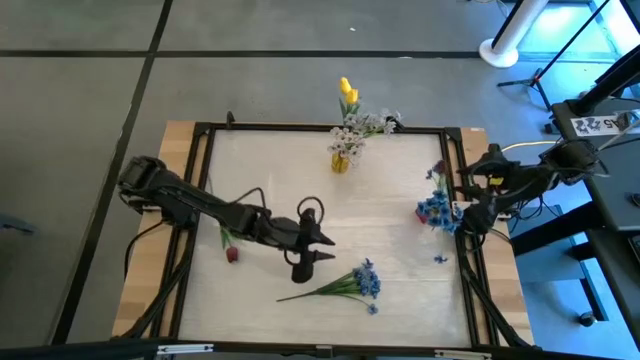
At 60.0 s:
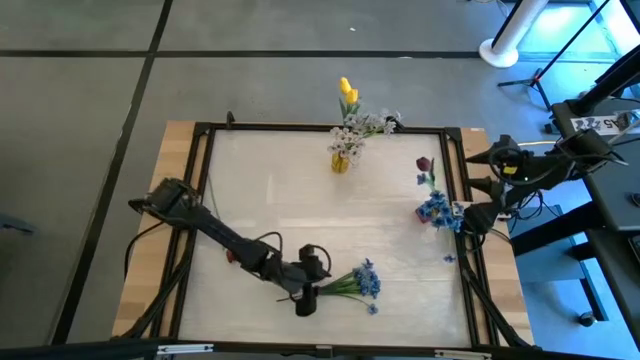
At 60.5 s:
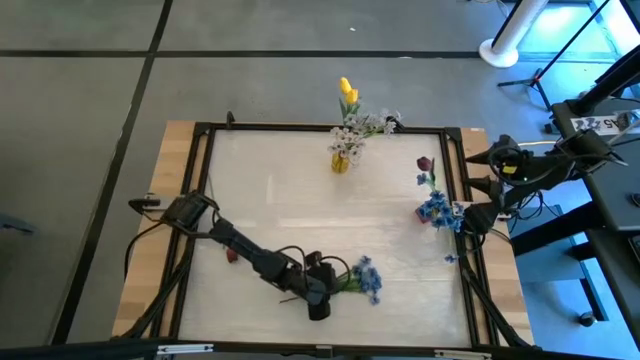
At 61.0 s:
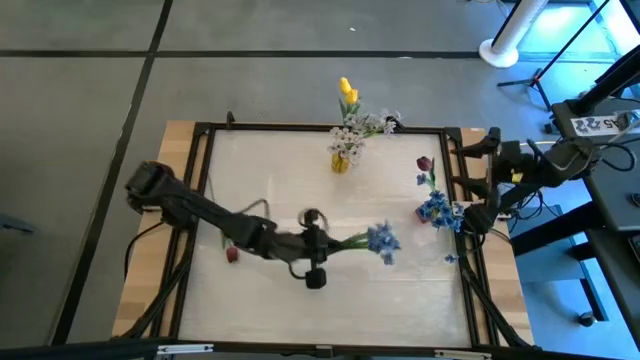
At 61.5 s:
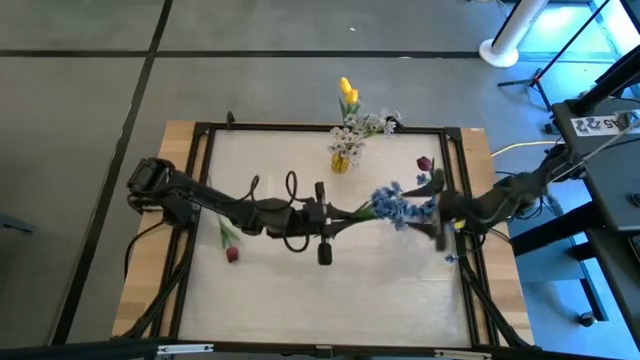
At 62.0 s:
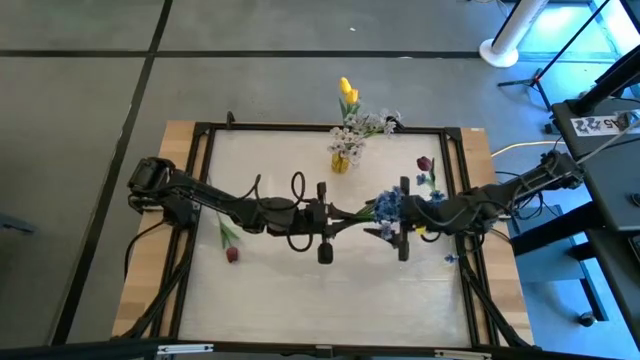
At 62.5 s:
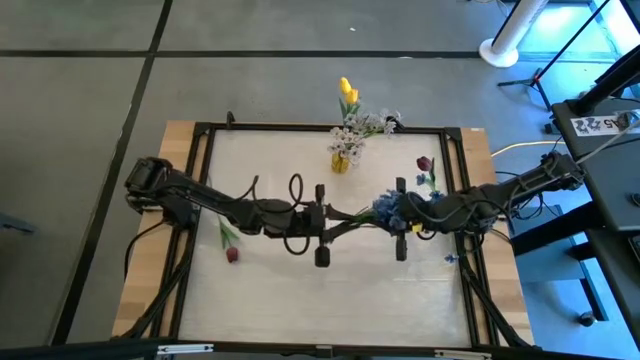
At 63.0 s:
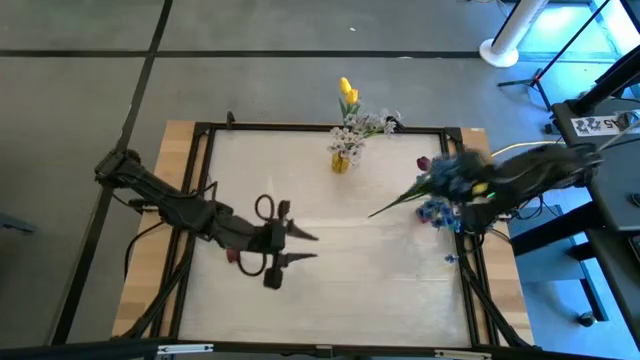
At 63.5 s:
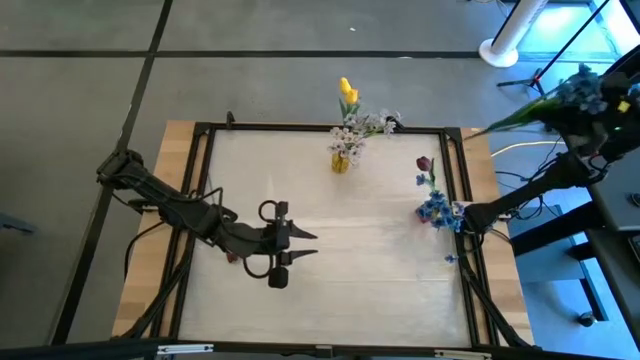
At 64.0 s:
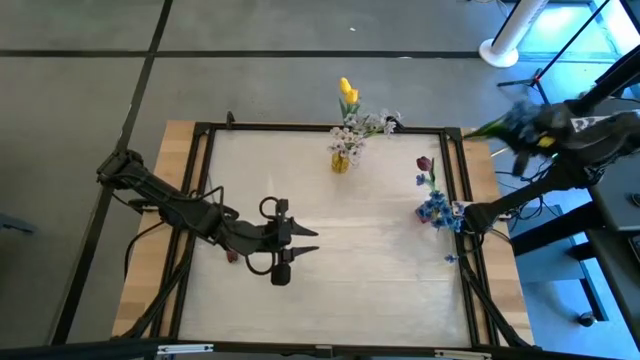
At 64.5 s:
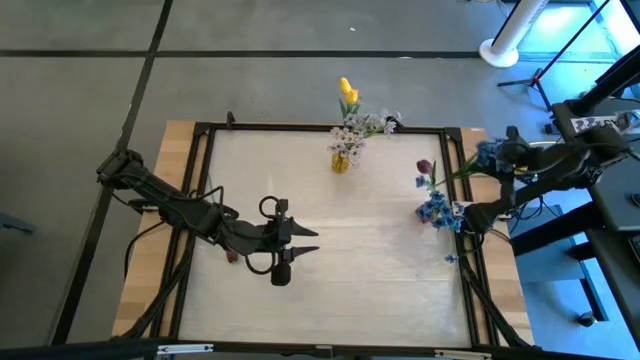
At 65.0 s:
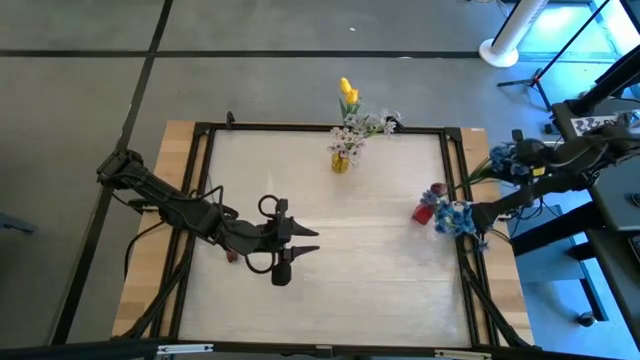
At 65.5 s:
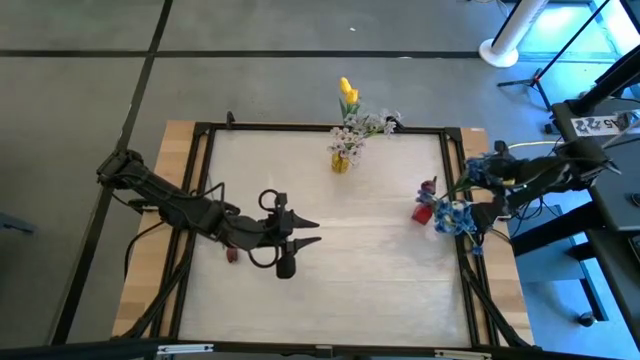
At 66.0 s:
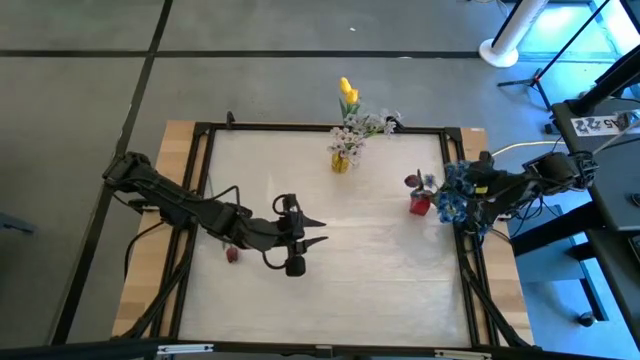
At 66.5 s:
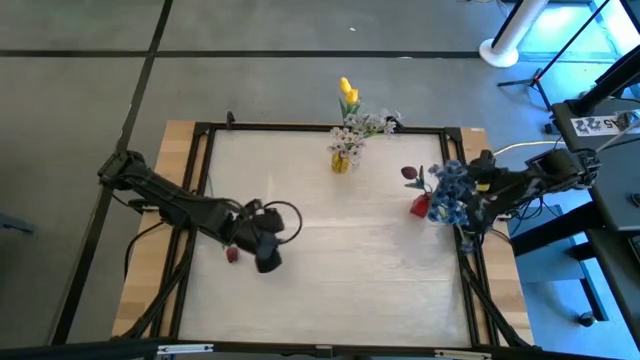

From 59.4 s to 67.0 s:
Task: Sort flowers into vase by color
Put the blue flowers into the red vase

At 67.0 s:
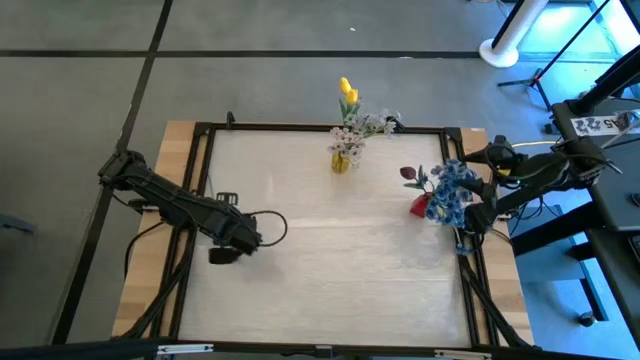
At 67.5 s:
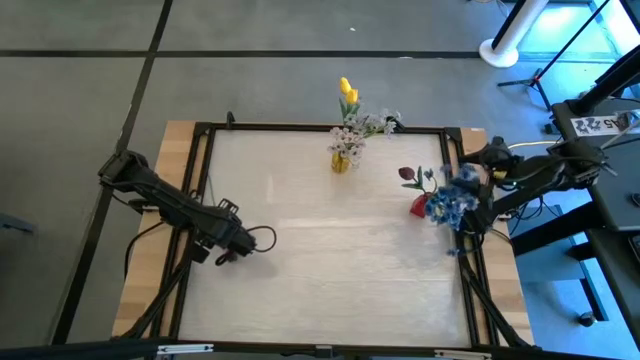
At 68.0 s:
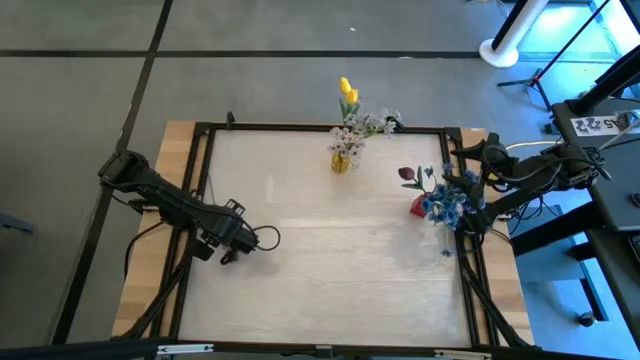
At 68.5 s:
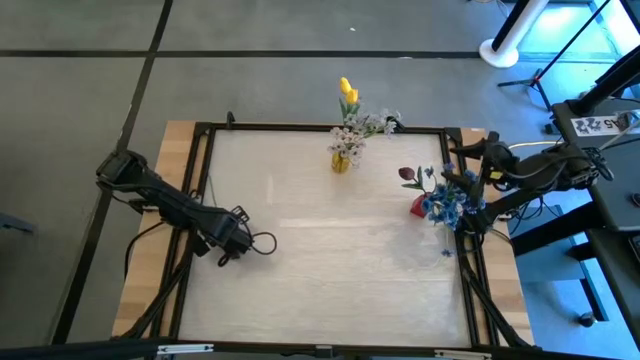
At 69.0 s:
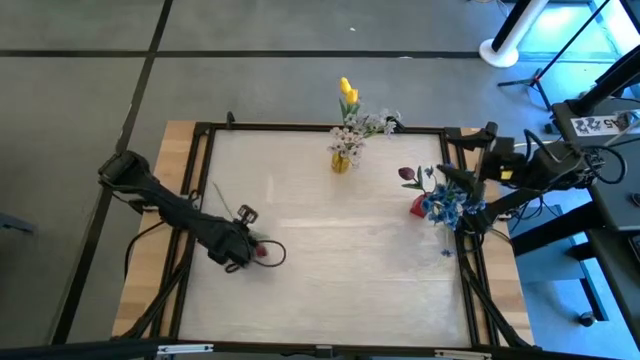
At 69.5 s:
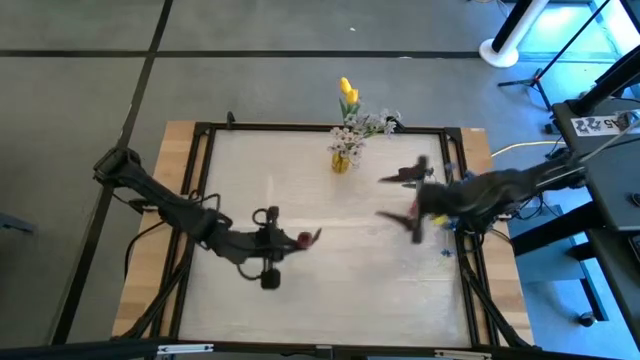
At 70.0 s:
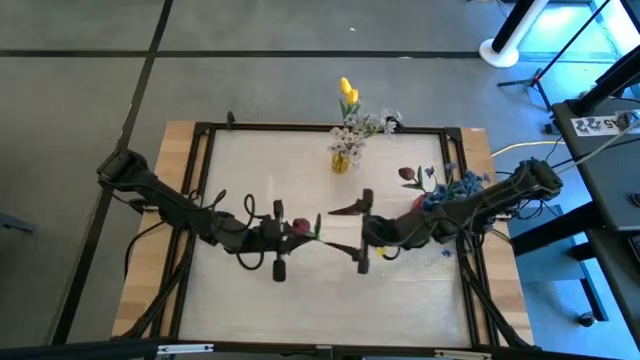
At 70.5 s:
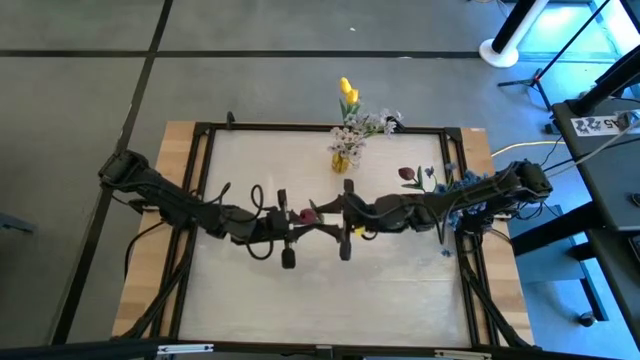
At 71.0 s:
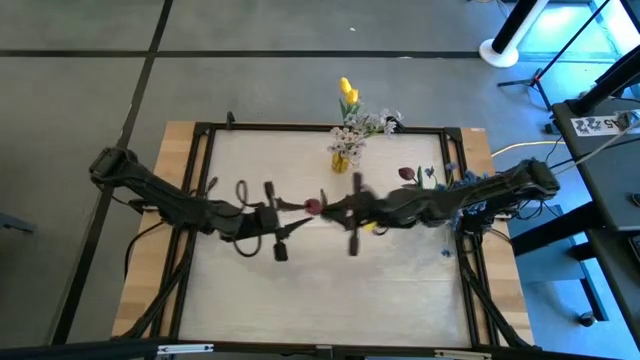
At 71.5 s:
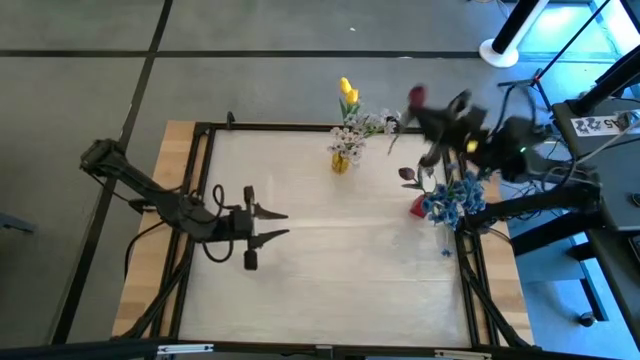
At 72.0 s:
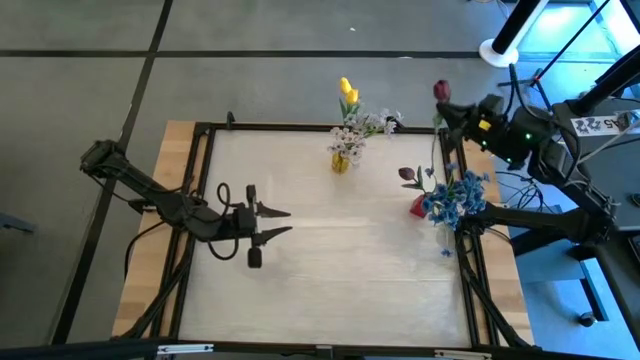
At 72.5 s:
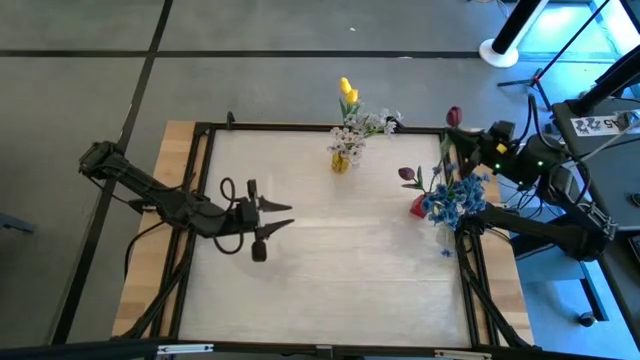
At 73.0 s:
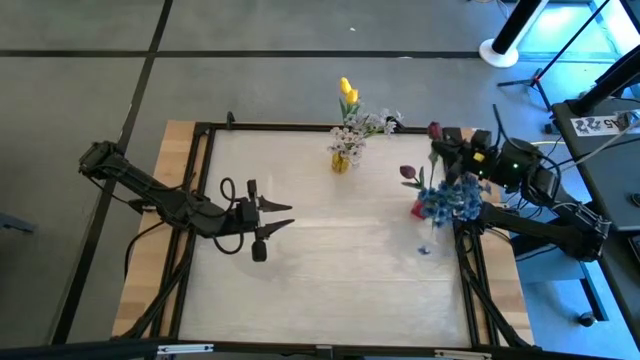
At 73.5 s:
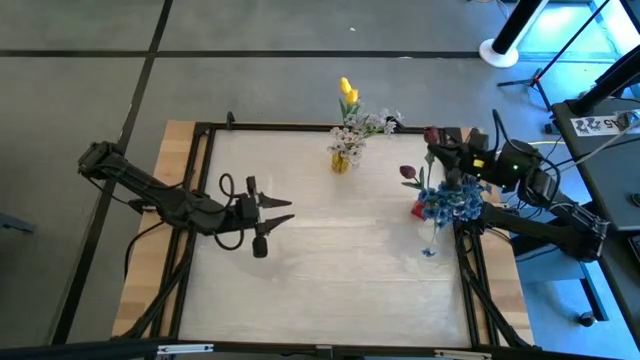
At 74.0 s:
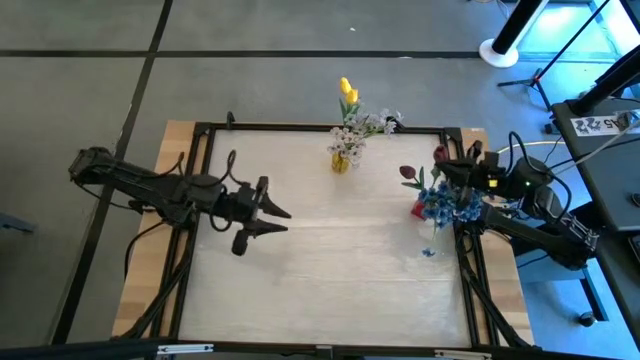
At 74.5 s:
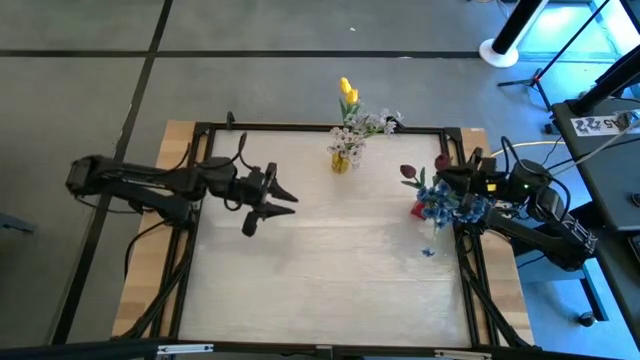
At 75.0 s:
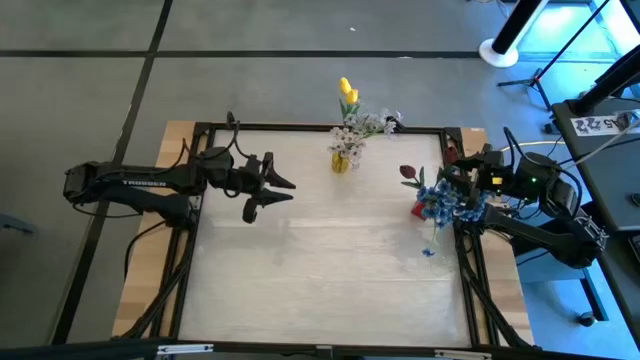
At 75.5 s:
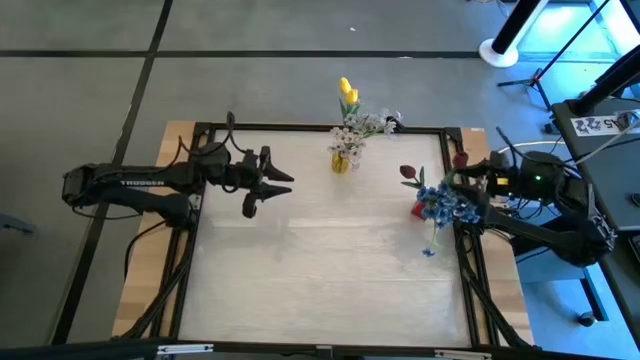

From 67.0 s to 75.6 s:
Put the pink flower into the red vase

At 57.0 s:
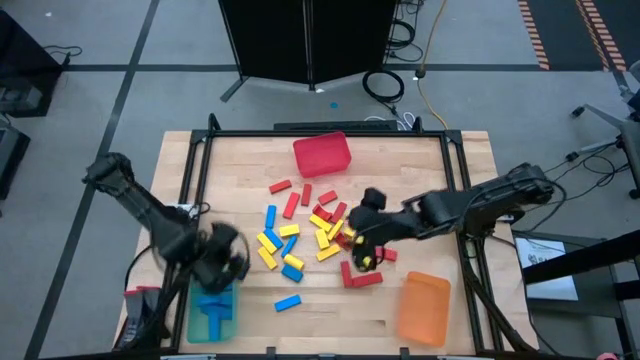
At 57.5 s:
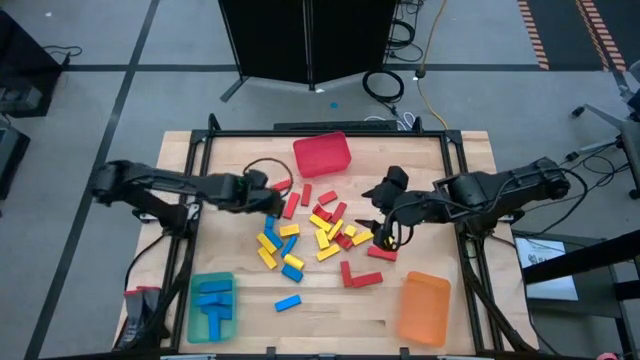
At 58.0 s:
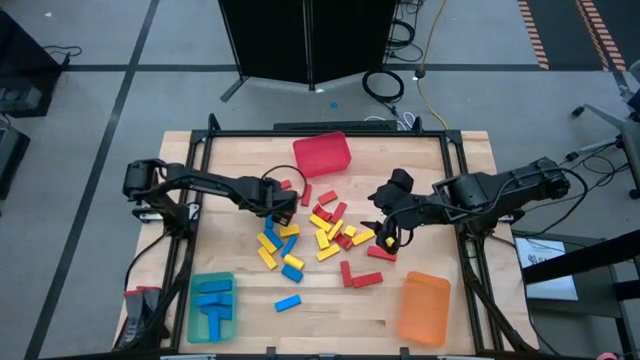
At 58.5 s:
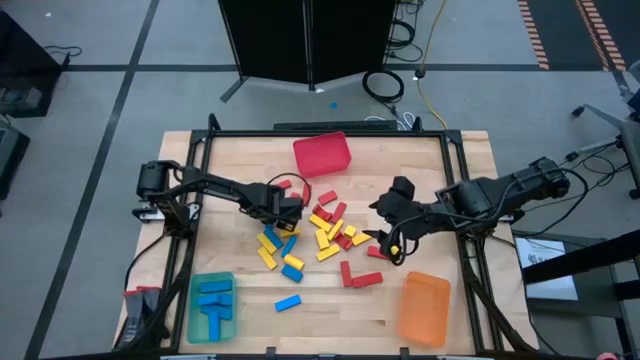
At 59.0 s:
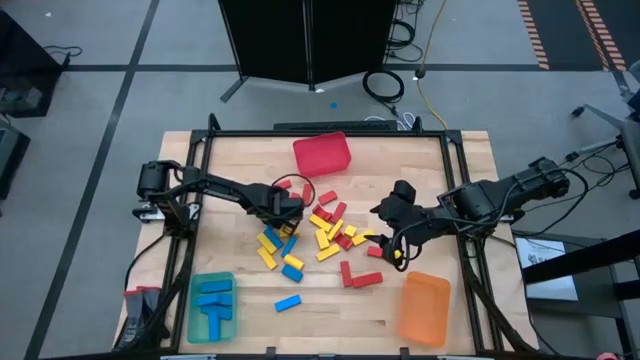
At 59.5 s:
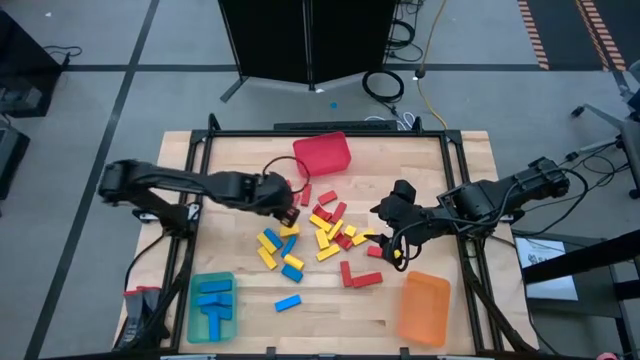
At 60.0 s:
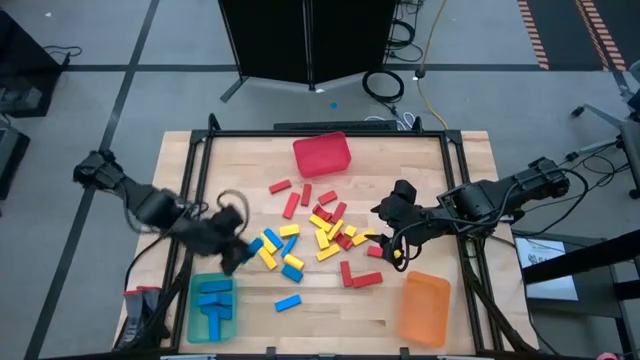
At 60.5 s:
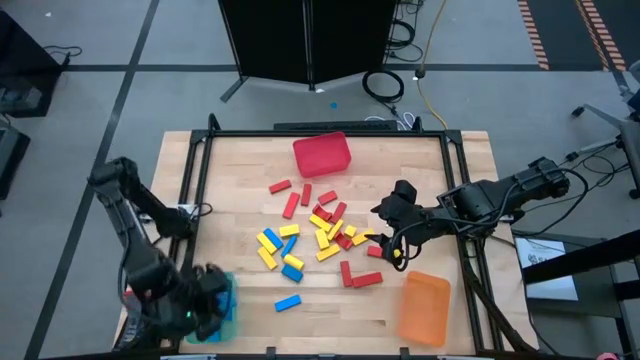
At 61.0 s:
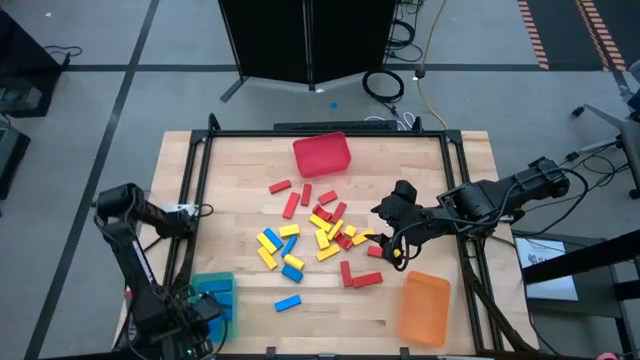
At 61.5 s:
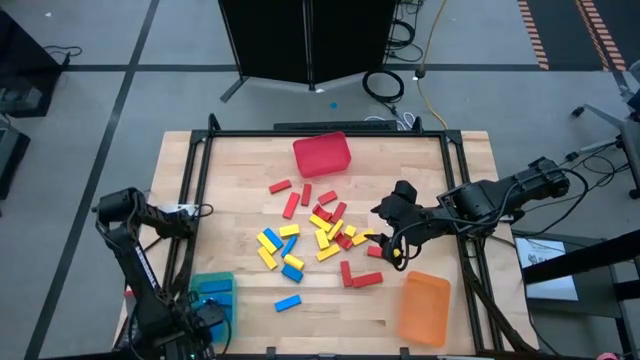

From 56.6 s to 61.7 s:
Task: Sort blocks
Put the blue block into the green bin
